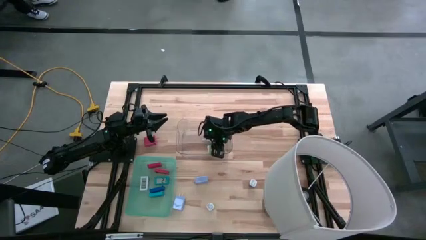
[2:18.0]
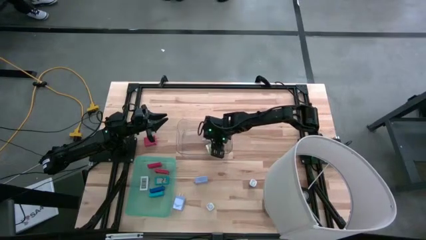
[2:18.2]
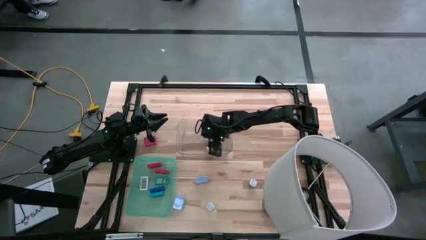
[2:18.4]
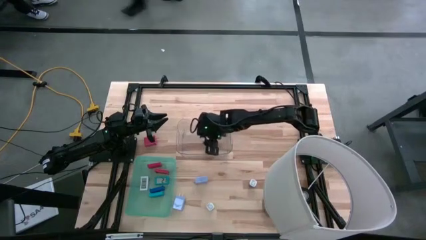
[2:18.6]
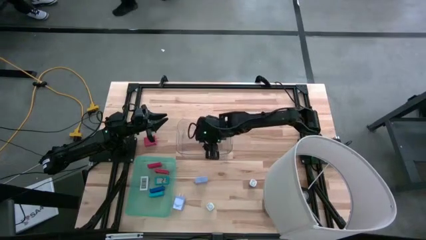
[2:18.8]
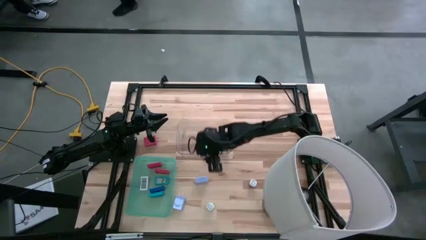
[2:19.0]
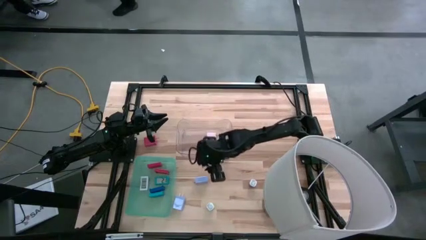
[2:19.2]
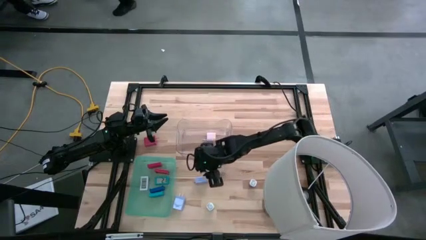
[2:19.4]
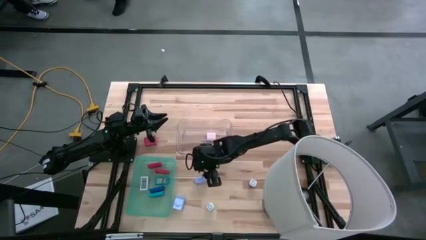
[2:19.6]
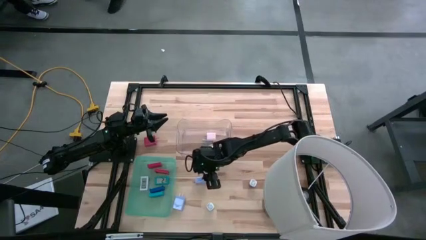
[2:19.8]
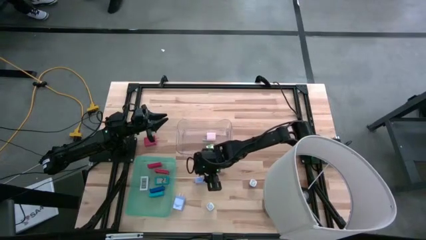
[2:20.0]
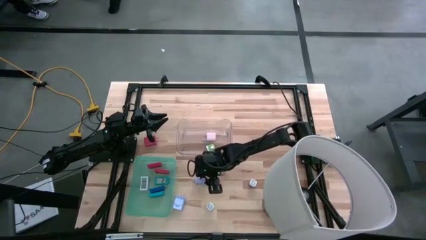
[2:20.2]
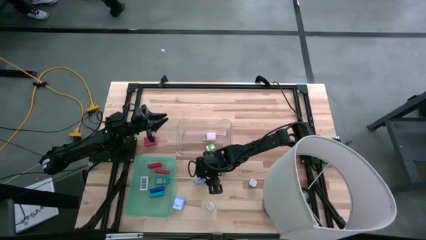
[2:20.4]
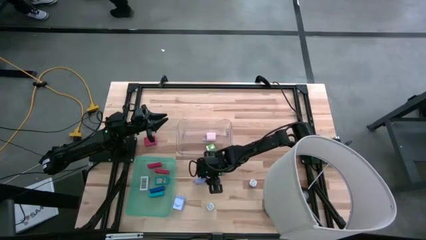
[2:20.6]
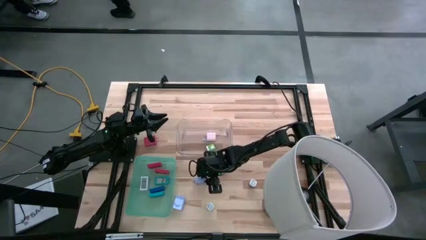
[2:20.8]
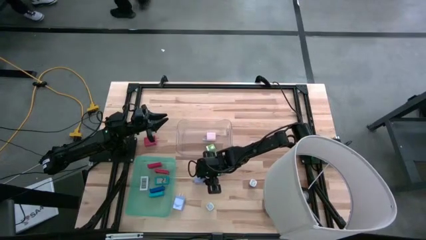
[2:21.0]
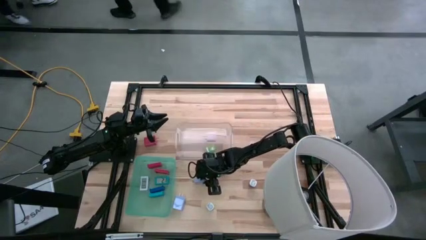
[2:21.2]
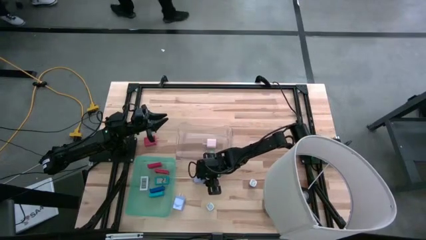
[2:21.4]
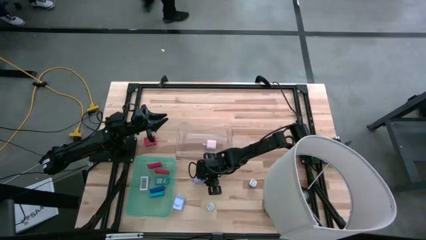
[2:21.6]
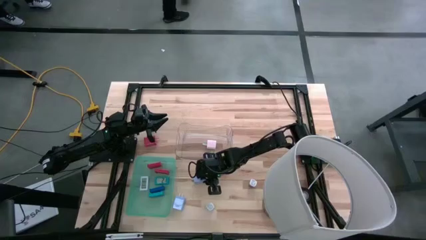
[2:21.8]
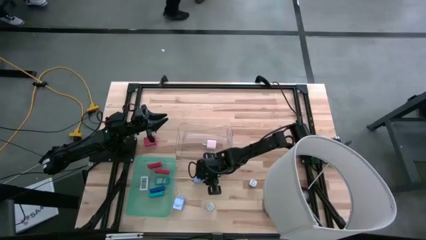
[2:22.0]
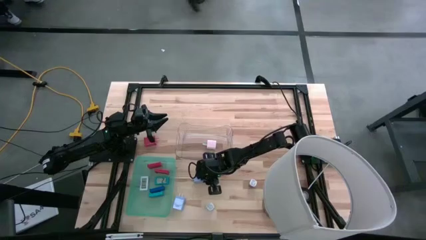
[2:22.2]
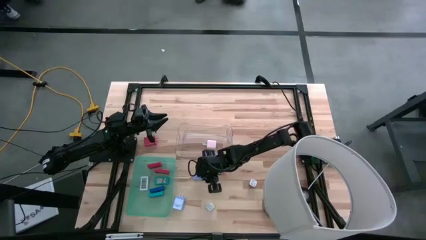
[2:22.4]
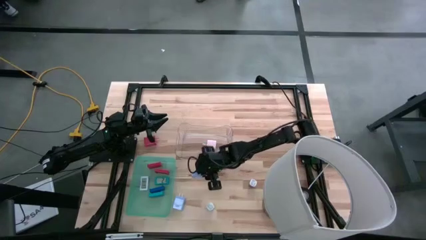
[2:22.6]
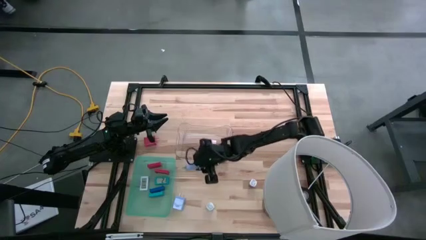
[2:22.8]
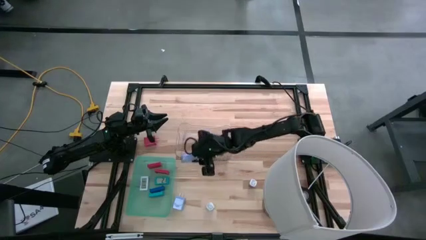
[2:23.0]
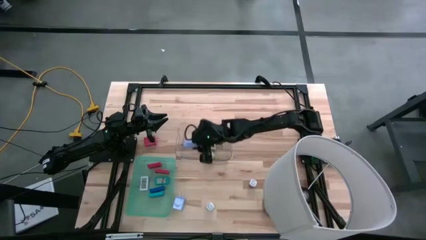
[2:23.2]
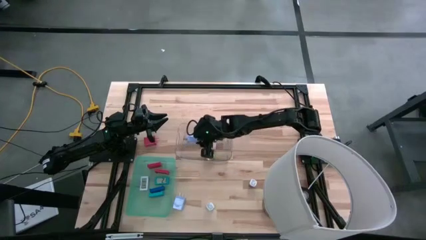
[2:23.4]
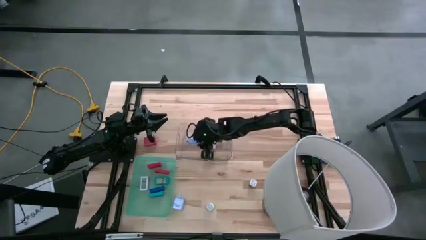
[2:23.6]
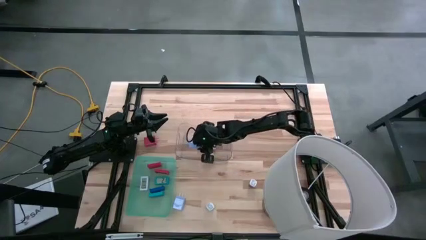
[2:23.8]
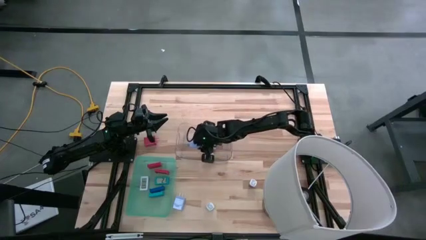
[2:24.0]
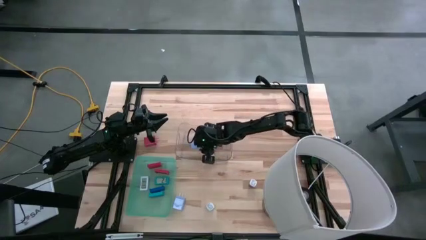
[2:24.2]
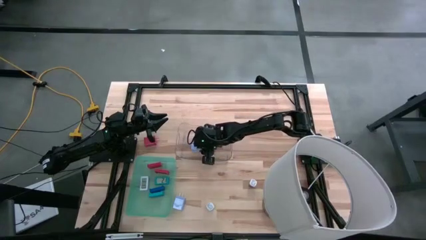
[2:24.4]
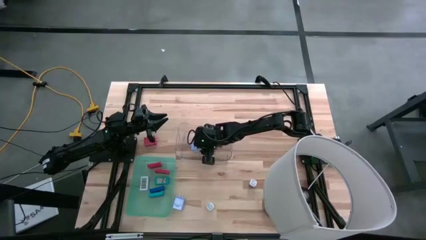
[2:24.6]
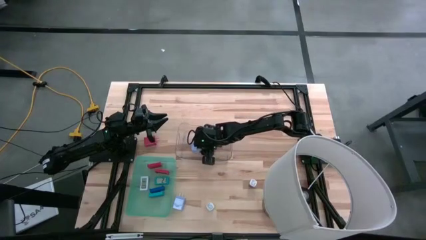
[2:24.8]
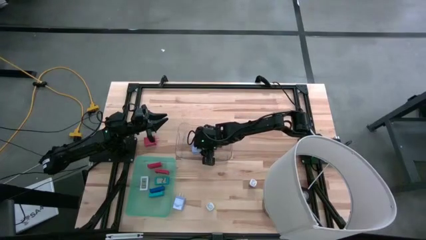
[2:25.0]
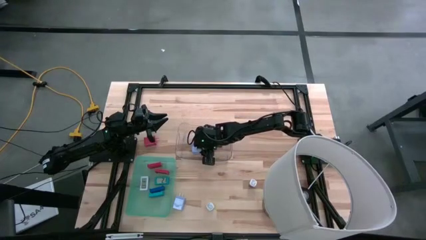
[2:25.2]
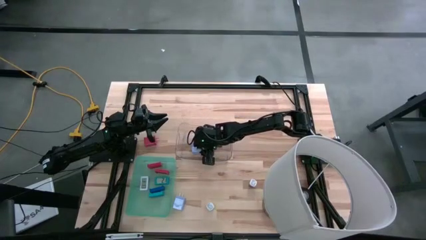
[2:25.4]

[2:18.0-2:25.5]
Task: Pick & Place Office items
Put the middle right blue charger adapter into the transparent bin

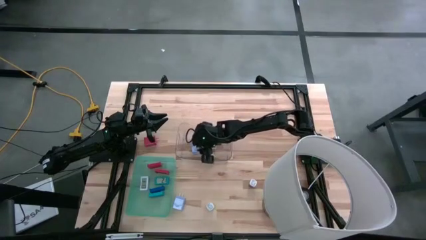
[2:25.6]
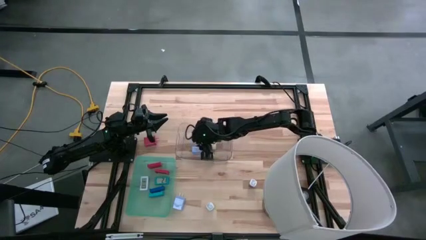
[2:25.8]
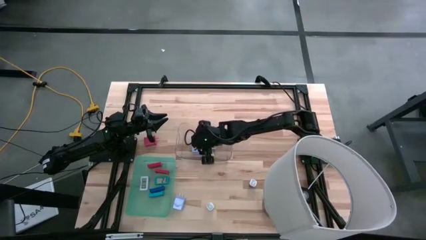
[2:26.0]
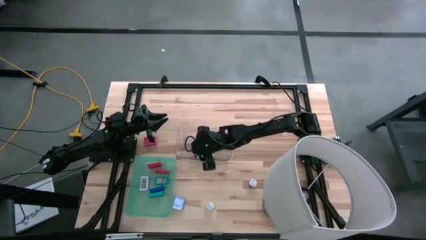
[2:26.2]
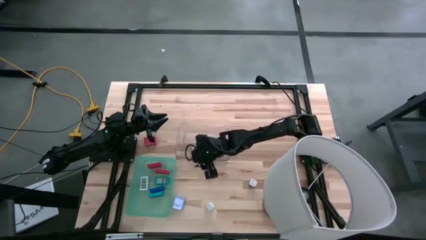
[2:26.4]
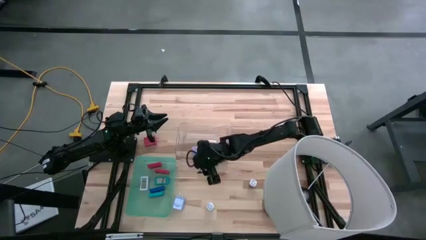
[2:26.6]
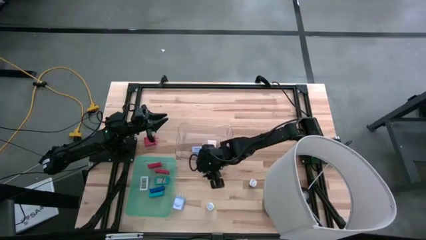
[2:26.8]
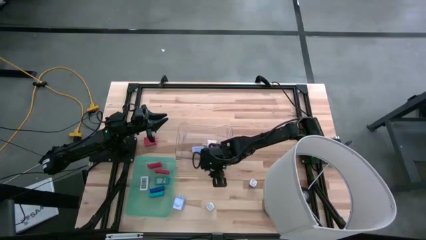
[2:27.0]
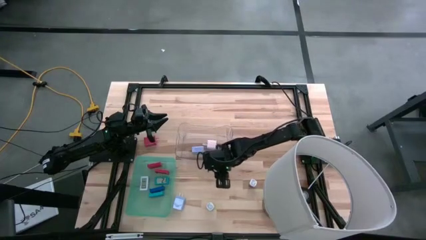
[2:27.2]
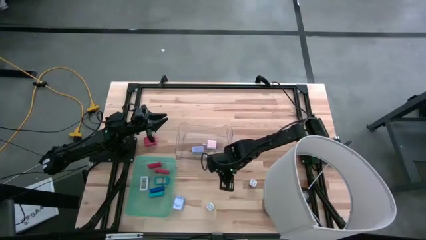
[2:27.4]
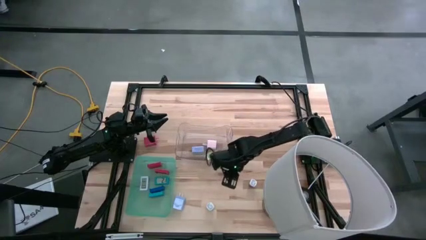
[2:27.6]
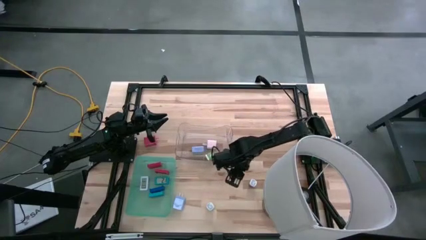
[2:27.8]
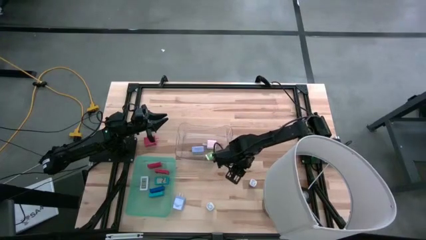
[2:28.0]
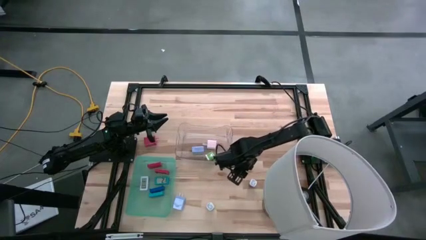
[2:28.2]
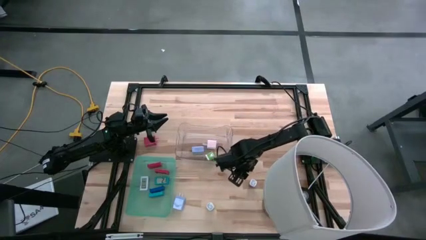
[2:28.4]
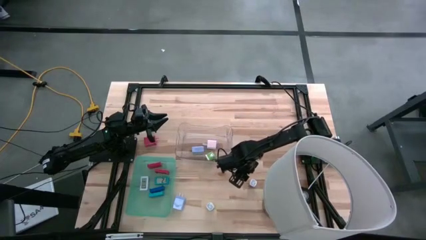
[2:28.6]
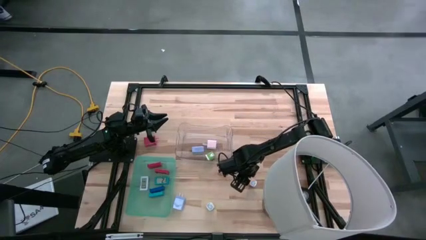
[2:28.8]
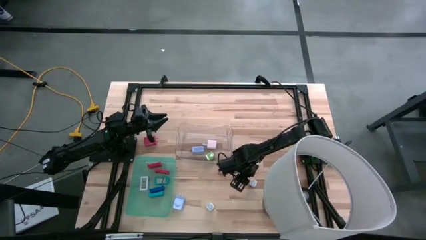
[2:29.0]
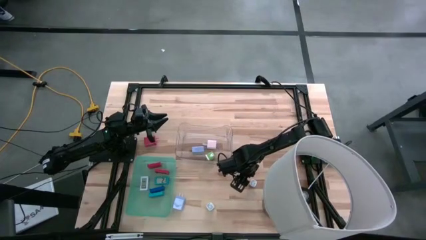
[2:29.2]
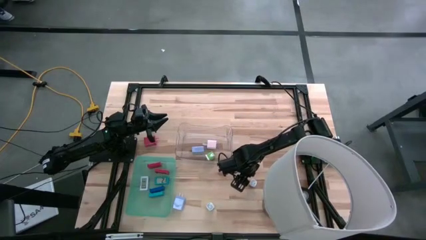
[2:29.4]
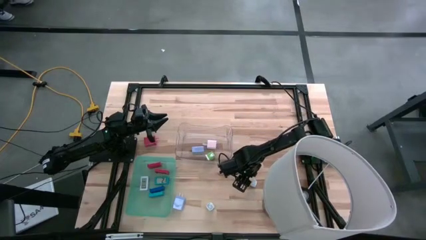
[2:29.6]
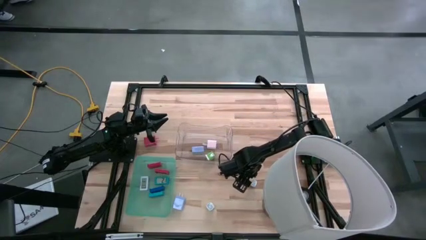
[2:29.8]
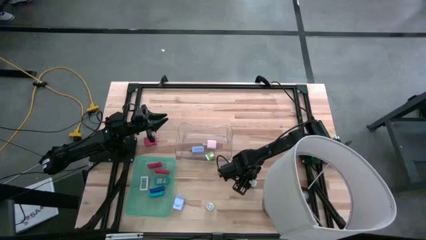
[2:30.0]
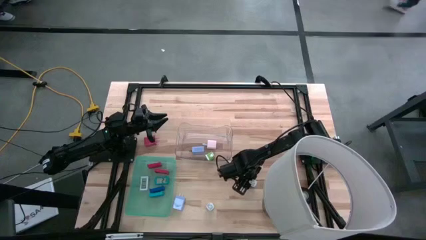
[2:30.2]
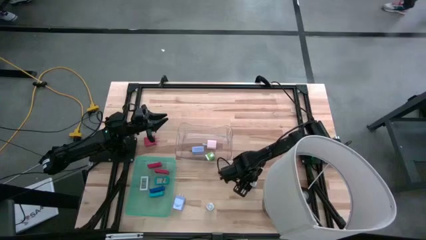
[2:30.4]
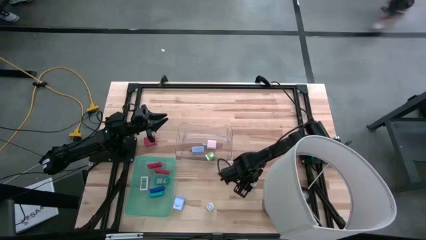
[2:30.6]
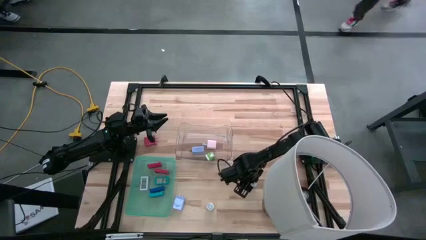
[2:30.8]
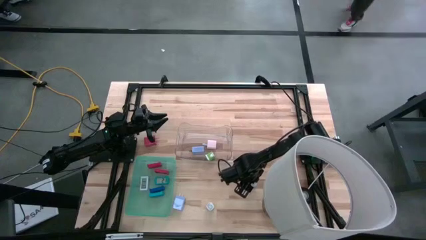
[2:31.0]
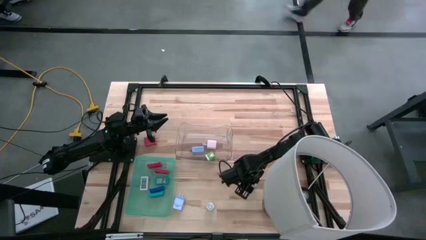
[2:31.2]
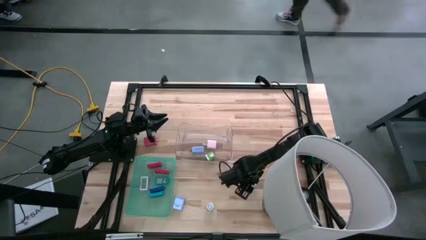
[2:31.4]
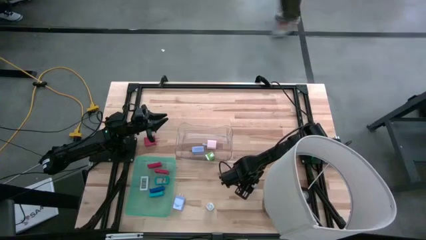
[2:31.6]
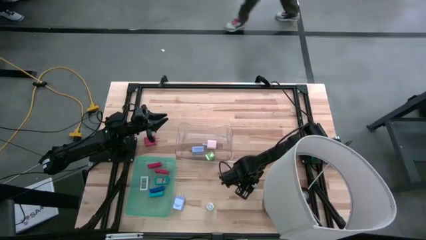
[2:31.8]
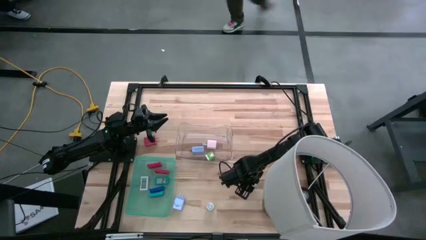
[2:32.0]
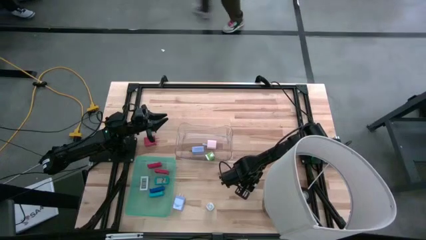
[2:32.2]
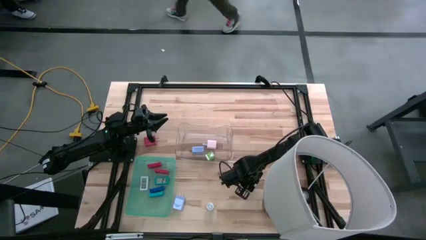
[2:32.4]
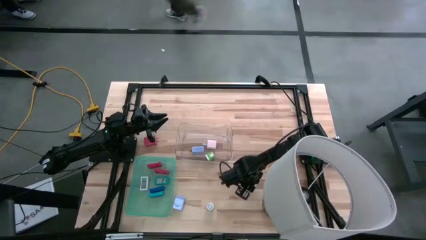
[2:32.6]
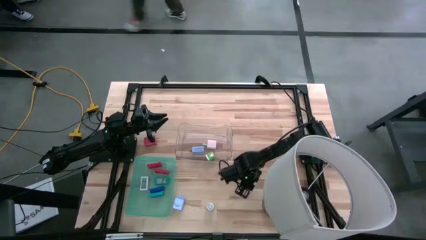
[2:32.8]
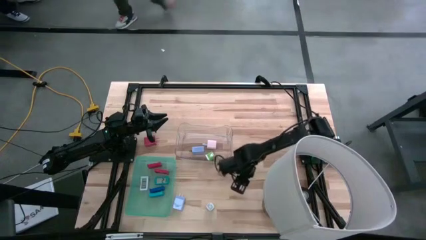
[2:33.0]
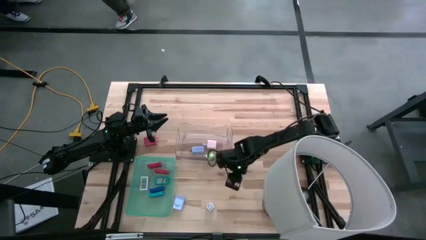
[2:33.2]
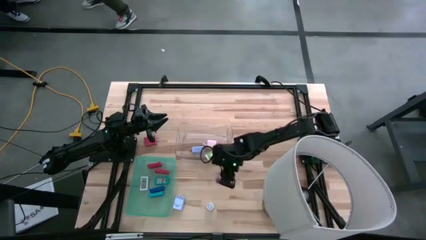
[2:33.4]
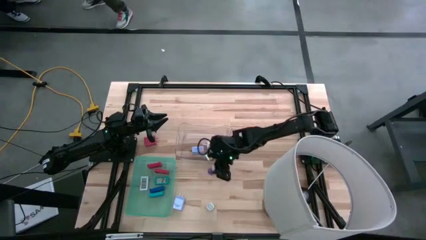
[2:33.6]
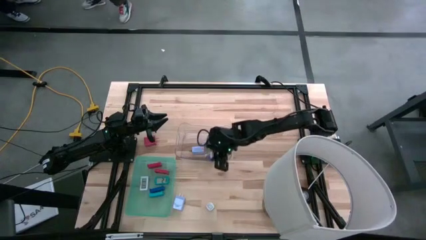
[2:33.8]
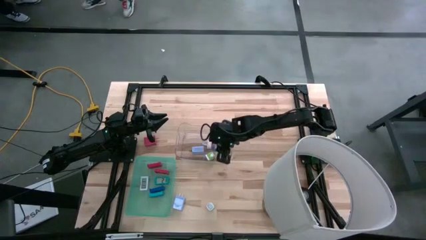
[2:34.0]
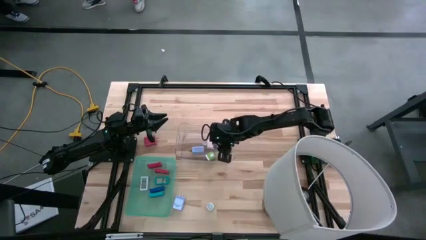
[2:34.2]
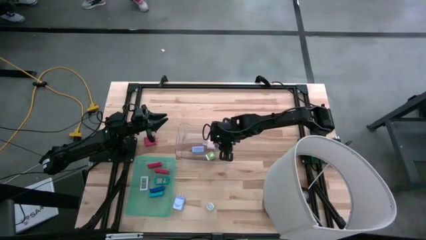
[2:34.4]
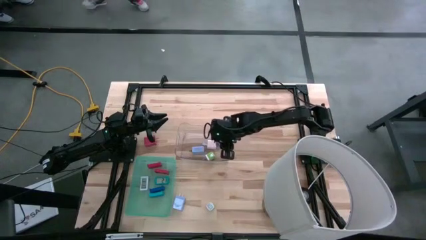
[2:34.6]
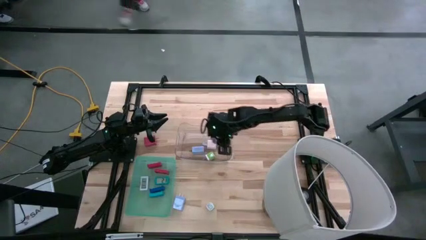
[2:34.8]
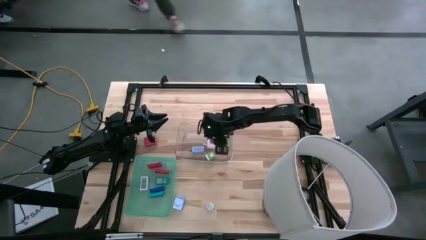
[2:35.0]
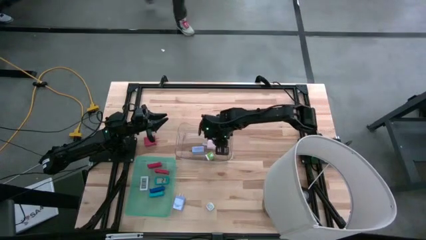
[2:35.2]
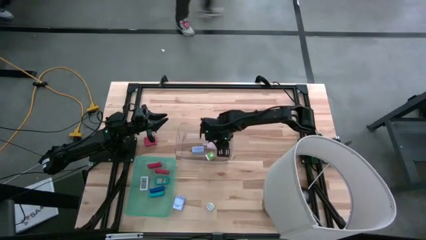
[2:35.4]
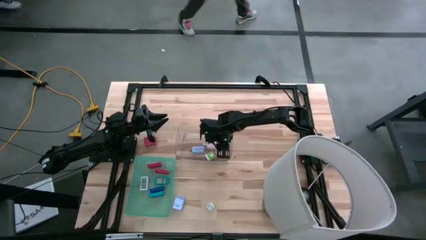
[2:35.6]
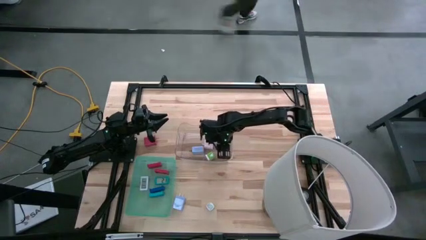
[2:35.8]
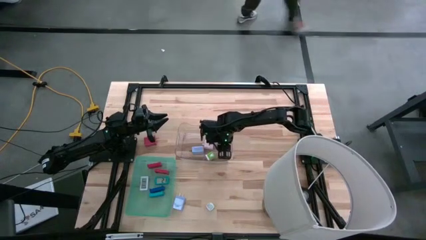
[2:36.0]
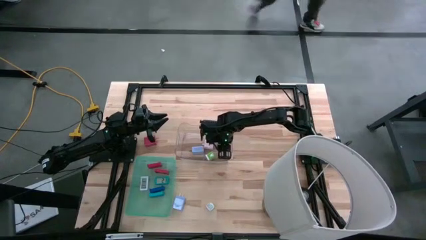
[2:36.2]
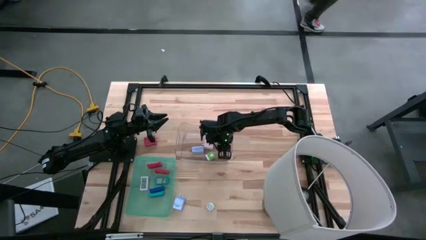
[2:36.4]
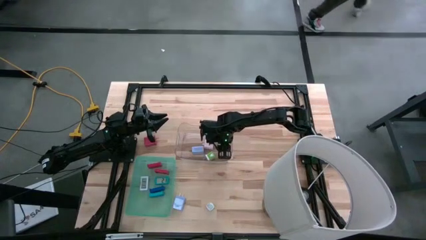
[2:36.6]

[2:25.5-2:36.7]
Put the violet charger adapter into the transparent bin
